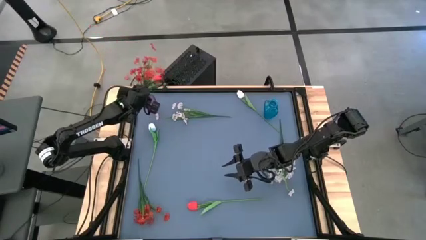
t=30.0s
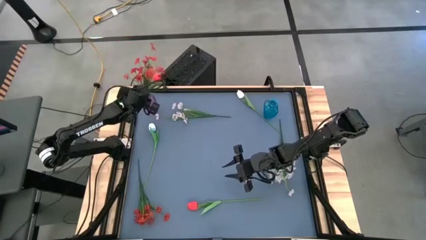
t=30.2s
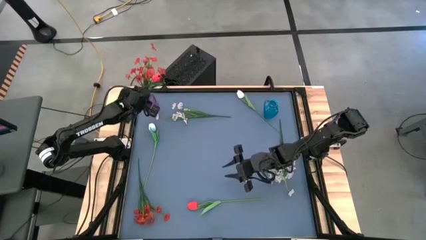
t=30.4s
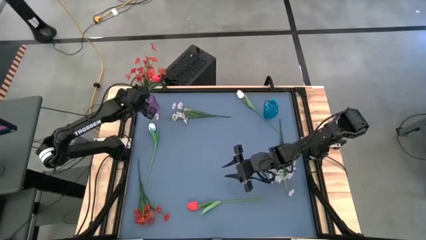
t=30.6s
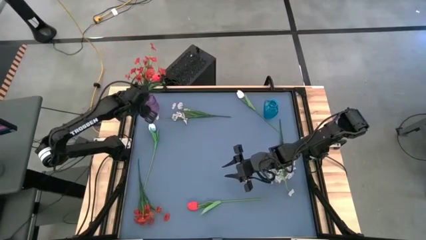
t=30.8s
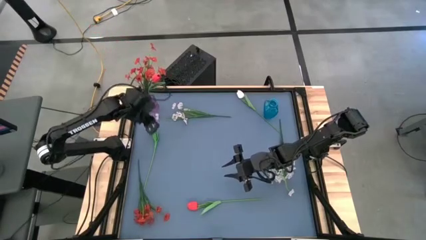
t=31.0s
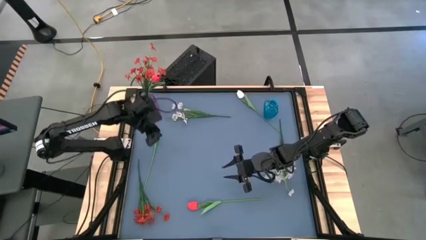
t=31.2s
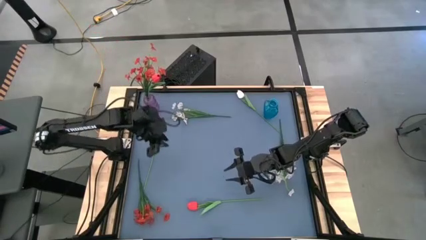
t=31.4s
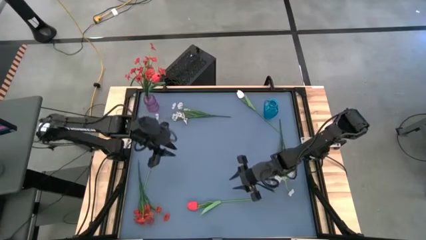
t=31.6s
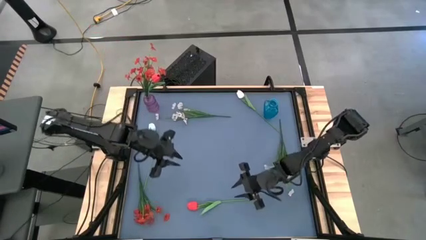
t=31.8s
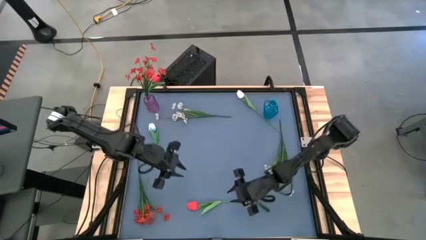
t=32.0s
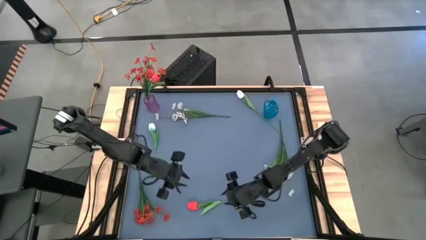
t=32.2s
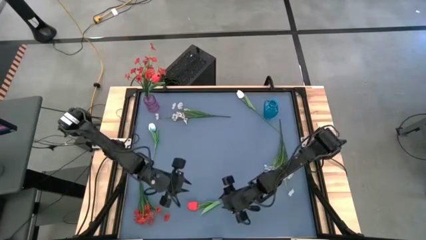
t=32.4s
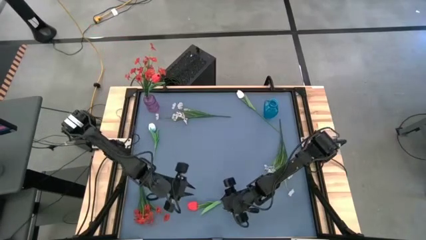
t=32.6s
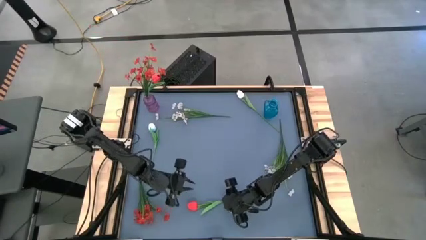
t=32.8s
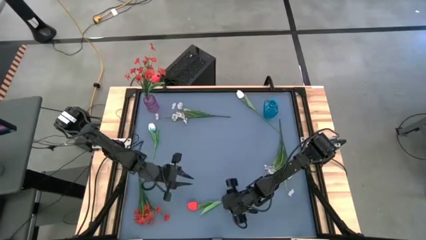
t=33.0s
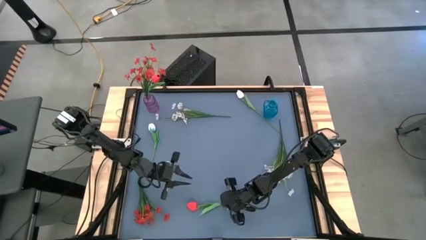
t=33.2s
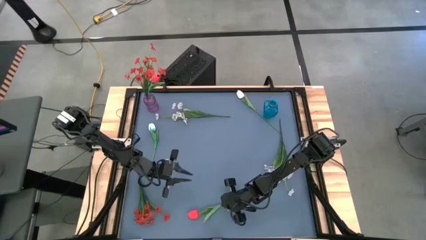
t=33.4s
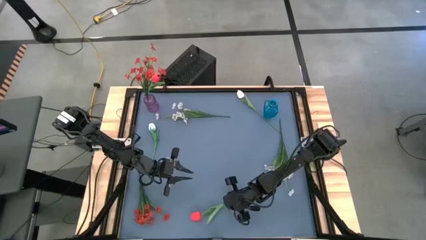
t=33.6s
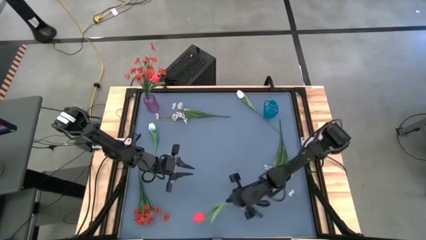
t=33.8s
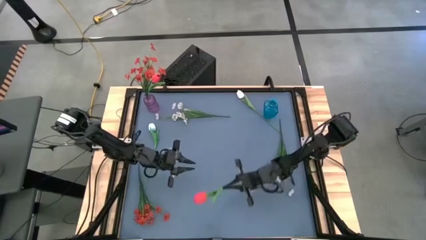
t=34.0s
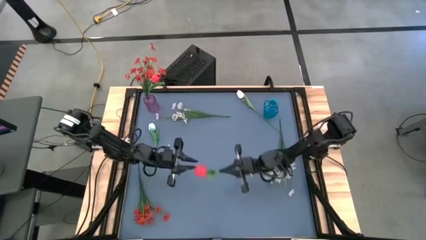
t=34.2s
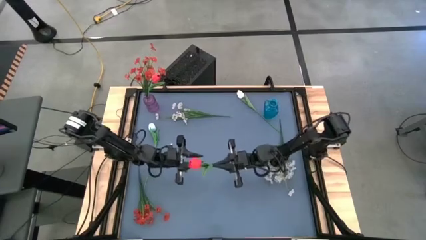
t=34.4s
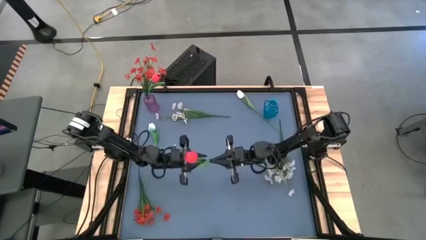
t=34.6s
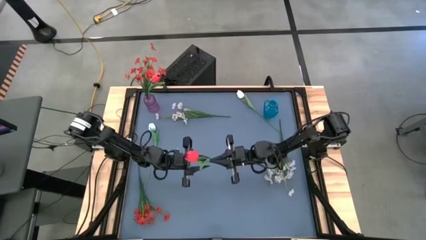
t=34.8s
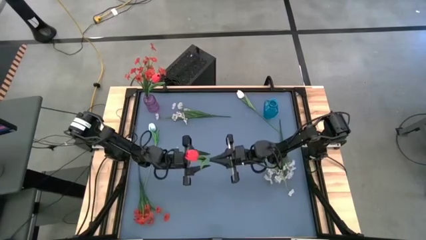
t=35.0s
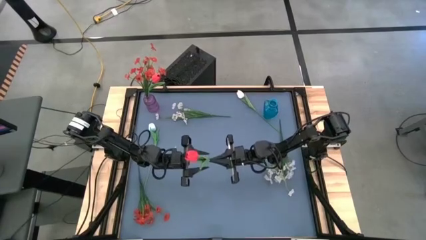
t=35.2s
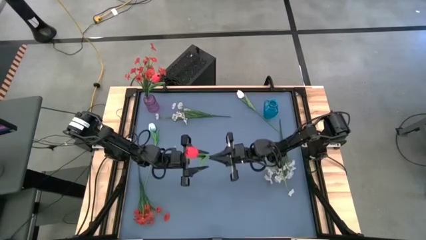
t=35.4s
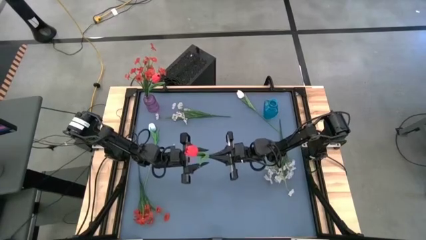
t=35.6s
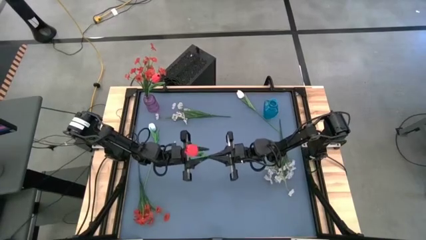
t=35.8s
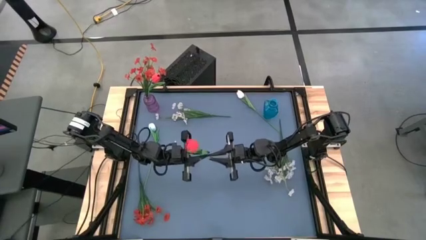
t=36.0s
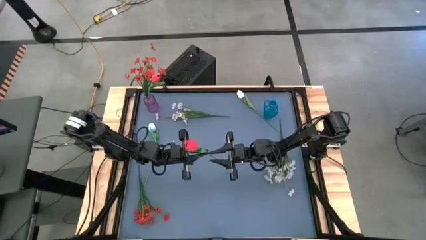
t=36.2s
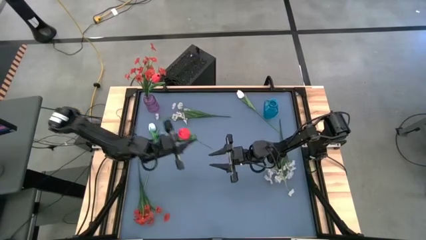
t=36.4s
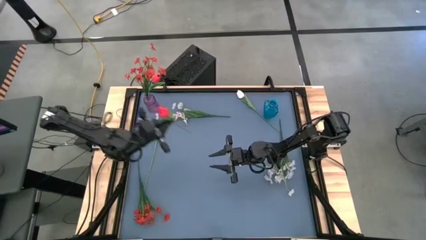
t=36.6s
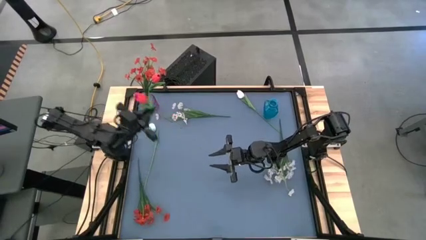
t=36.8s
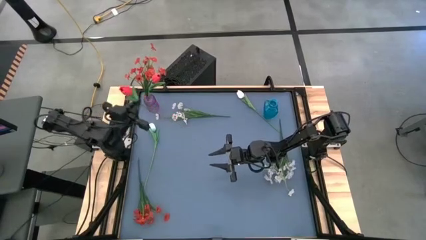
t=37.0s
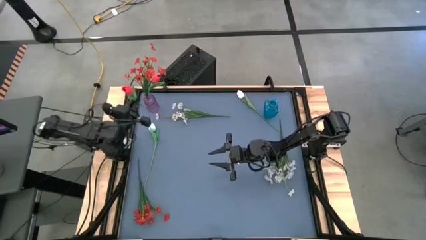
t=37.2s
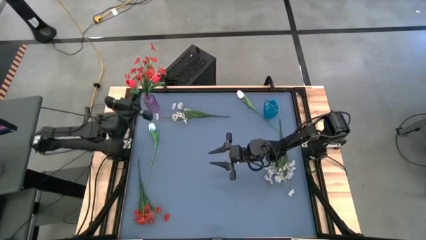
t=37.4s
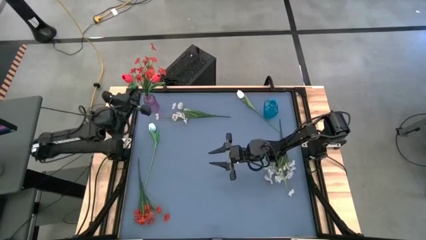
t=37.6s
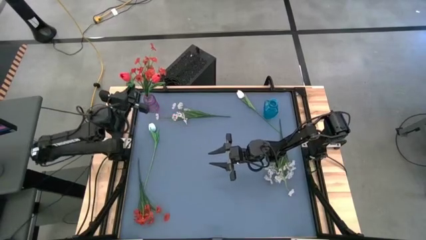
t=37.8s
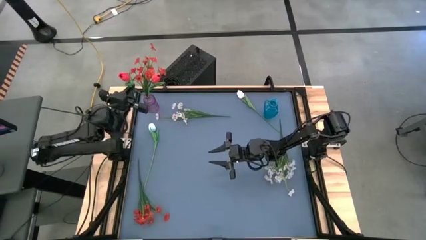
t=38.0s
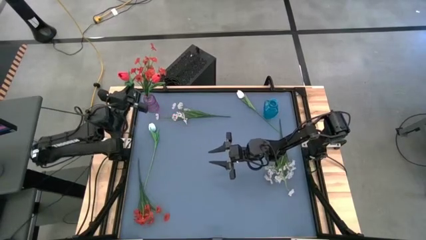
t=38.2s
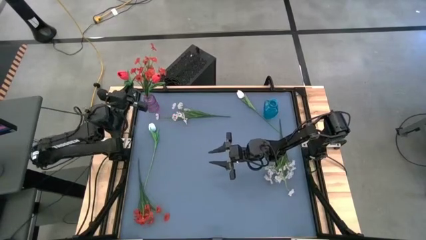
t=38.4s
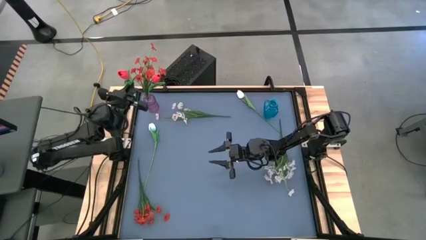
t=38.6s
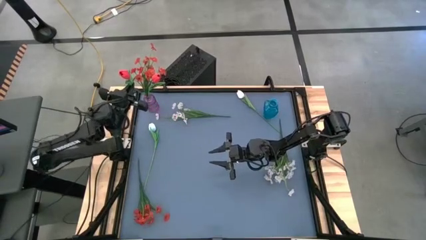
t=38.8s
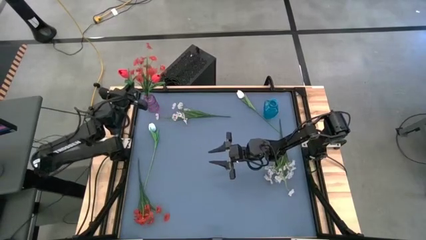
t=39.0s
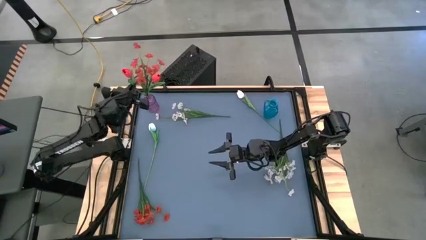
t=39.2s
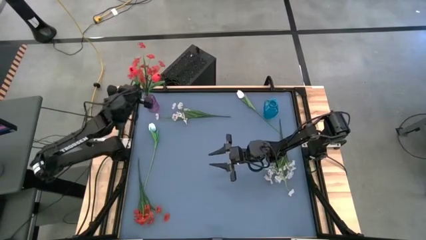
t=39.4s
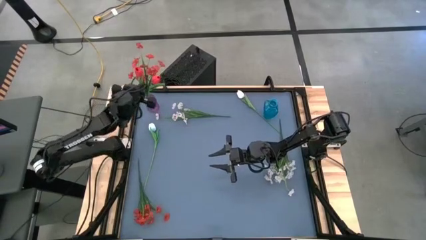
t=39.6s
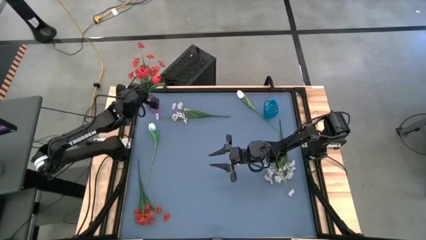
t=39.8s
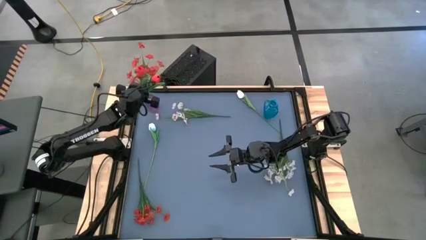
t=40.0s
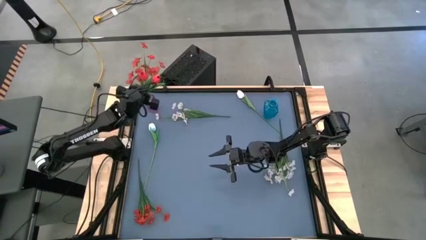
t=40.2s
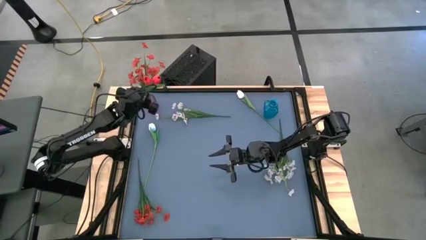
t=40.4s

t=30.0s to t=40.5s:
Task: Sort flowers into vase by color
Put the red flower into the violet vase

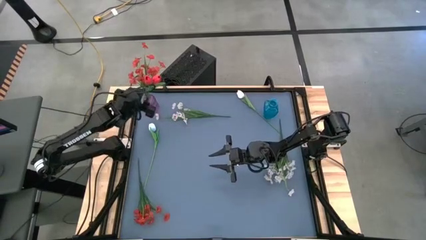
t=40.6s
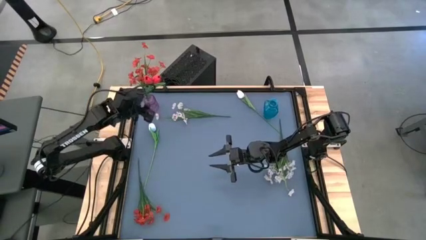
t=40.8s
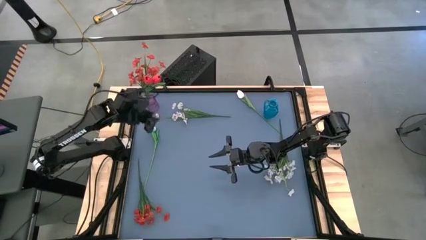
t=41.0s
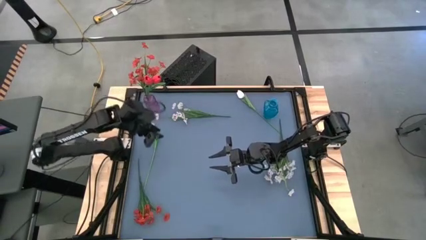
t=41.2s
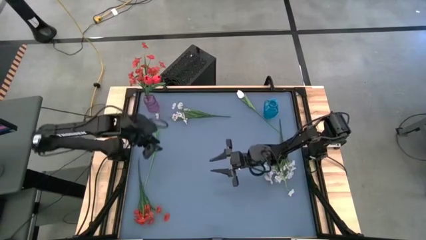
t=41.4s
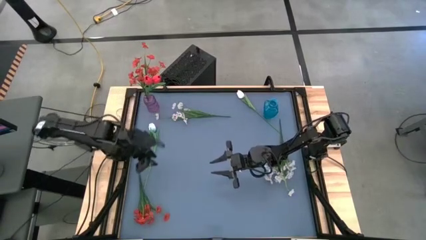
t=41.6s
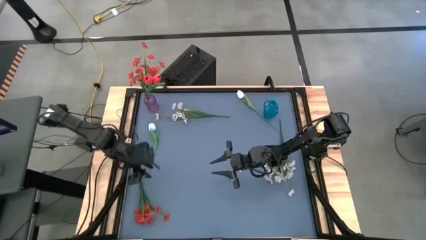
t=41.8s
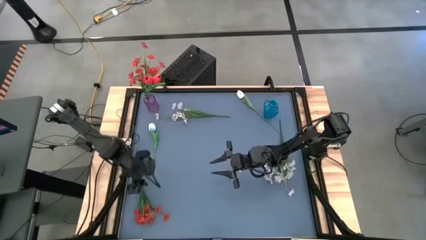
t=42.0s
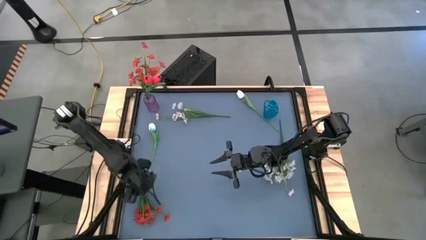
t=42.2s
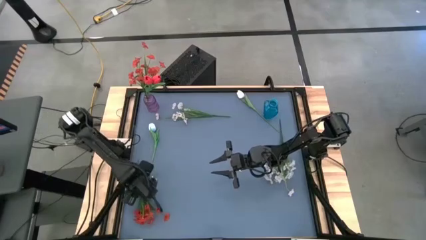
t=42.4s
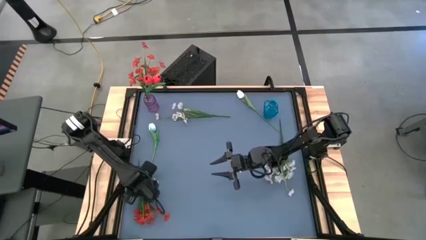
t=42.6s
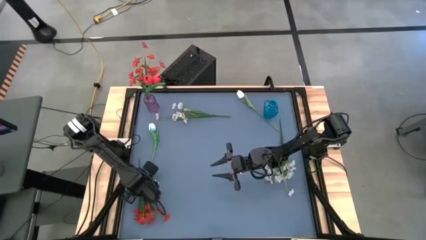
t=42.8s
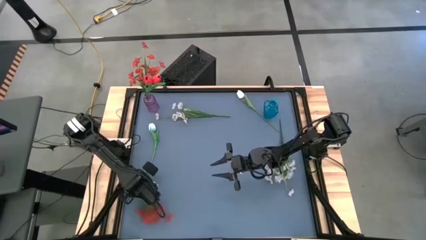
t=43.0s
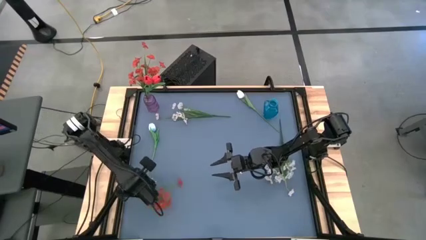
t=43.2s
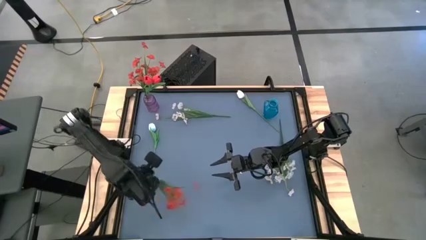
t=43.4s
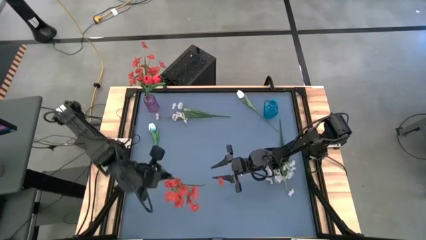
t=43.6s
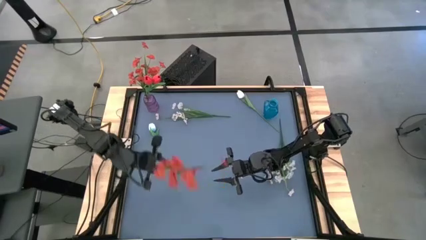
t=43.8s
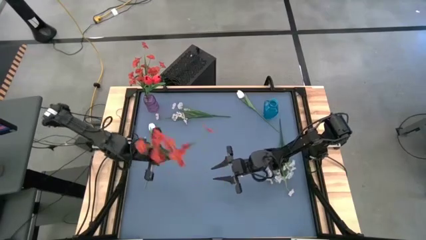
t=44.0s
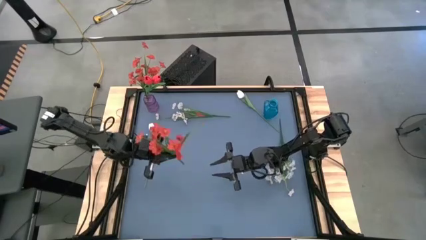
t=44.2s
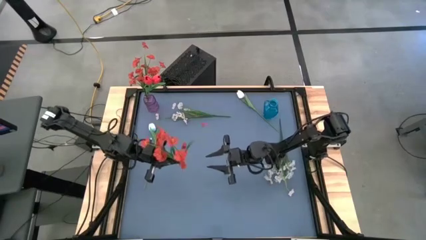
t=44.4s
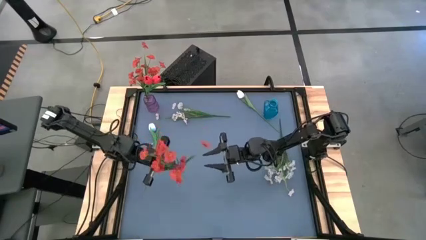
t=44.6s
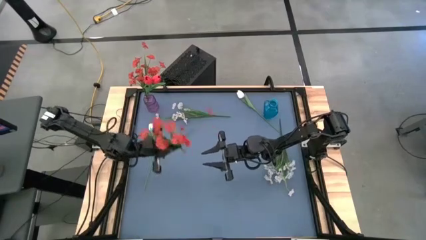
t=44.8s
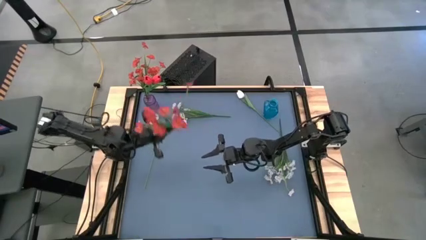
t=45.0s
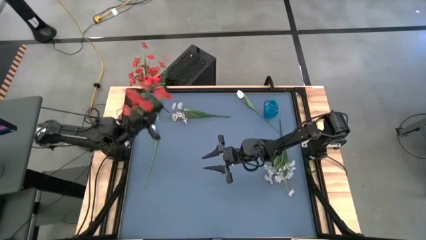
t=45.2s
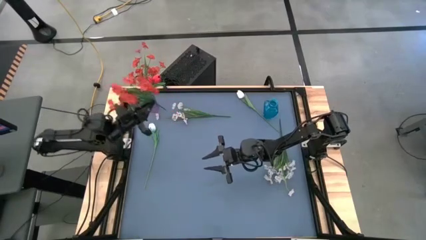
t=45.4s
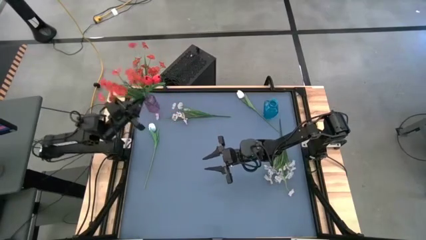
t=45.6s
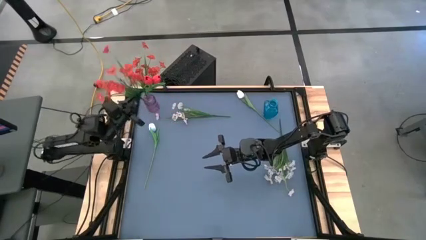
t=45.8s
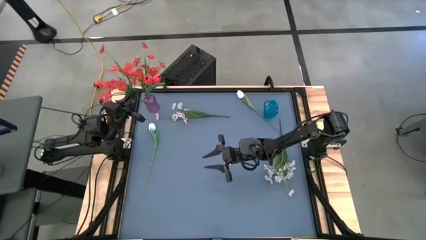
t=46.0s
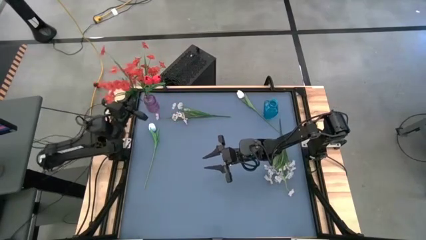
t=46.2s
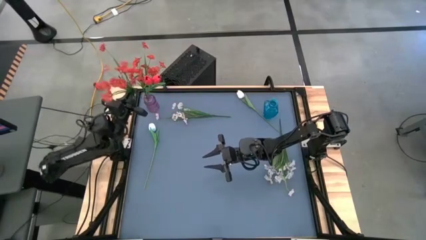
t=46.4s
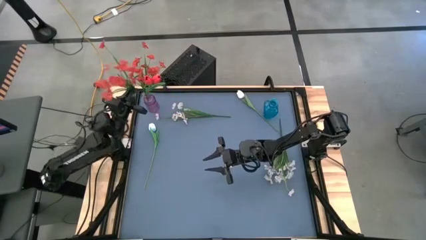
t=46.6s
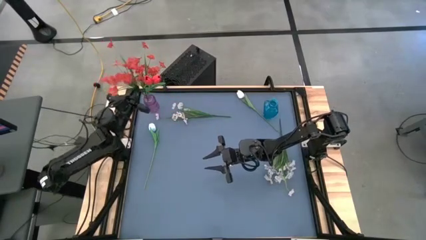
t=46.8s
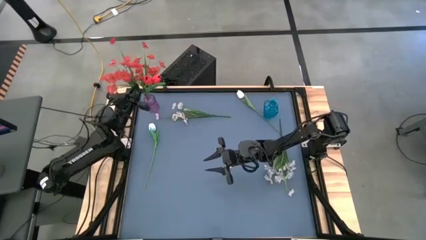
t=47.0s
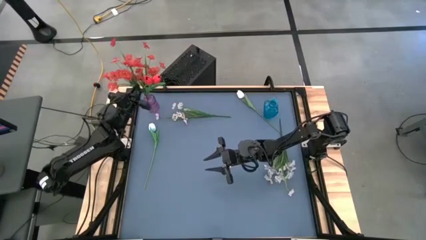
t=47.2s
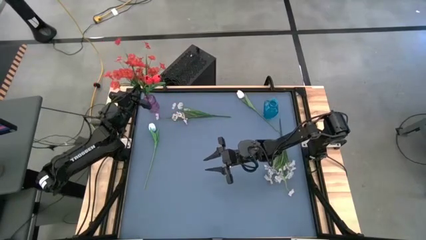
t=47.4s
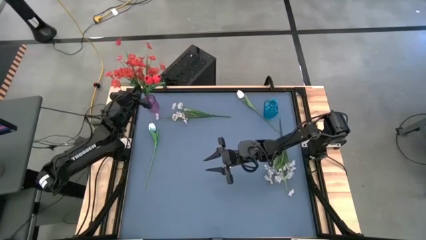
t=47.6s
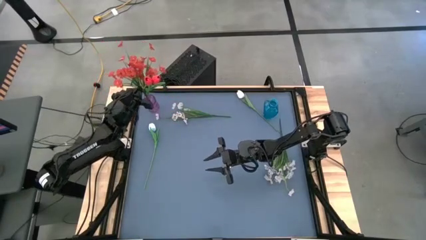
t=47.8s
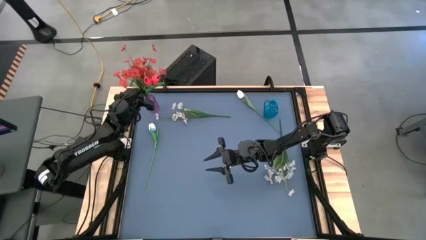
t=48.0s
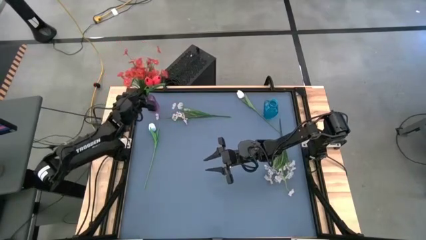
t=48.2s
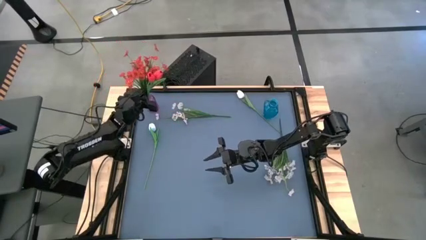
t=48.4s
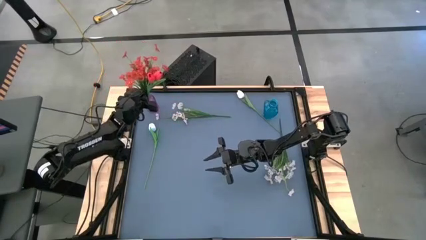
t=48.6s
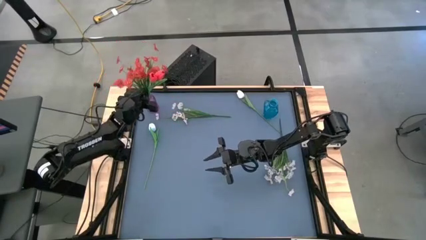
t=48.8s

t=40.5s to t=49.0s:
Put the red flowers into the violet vase
